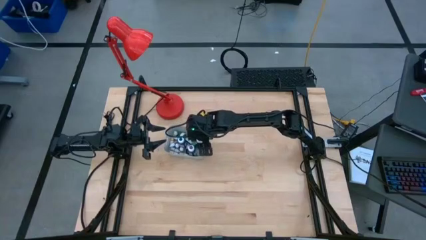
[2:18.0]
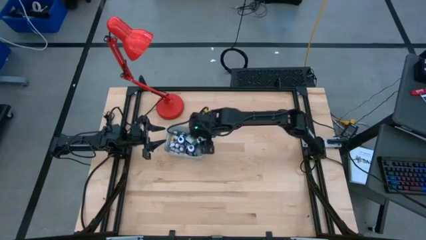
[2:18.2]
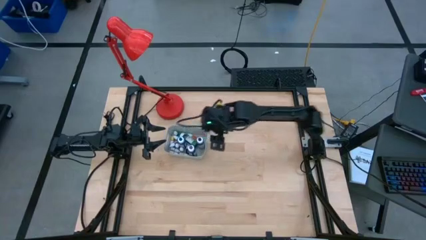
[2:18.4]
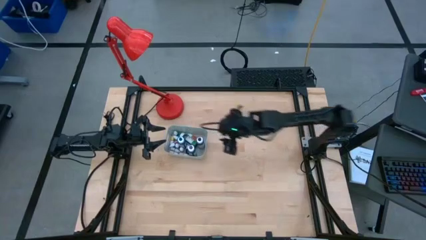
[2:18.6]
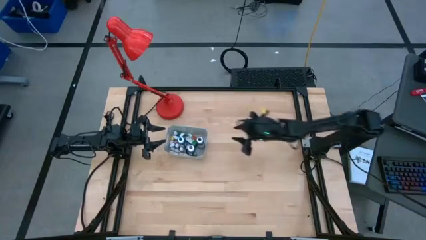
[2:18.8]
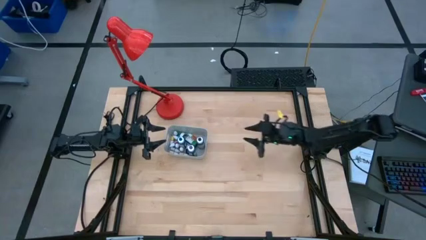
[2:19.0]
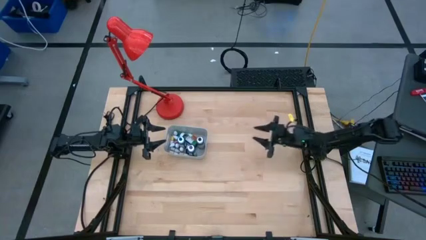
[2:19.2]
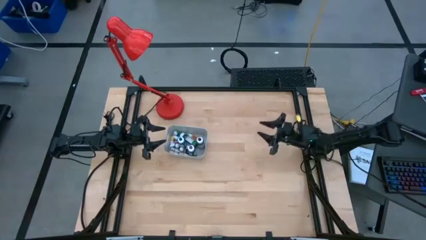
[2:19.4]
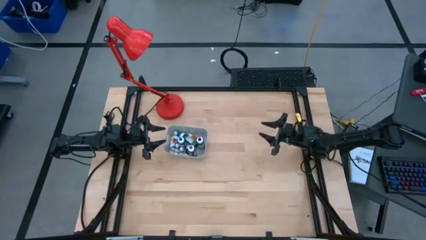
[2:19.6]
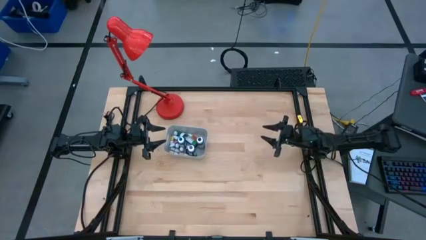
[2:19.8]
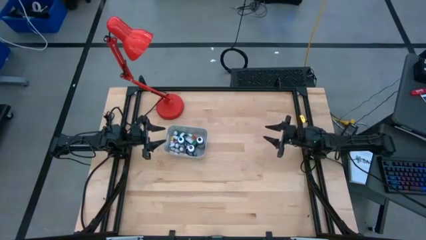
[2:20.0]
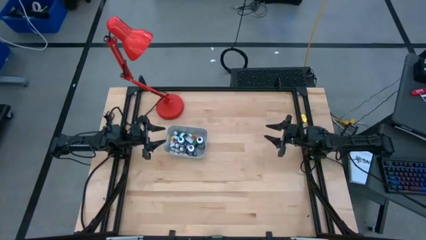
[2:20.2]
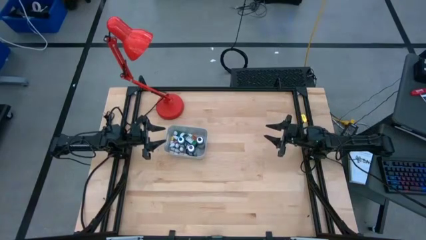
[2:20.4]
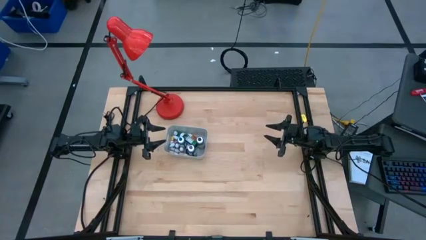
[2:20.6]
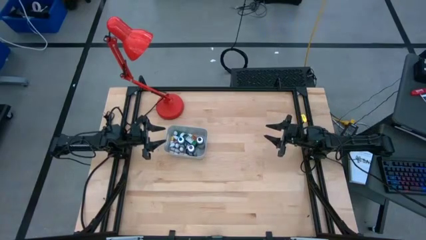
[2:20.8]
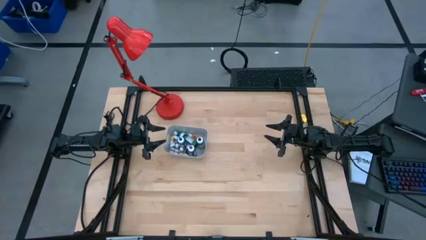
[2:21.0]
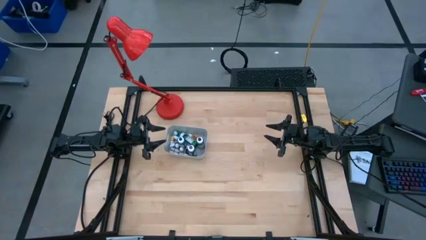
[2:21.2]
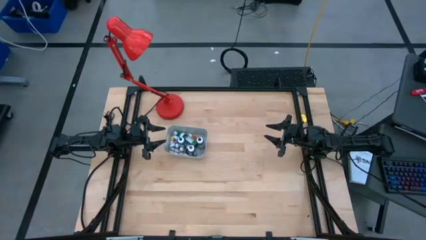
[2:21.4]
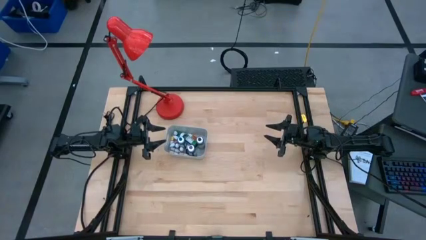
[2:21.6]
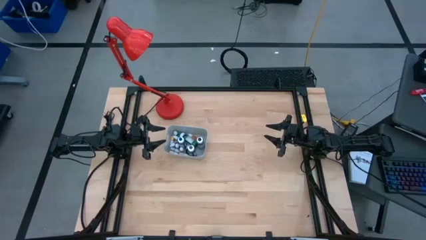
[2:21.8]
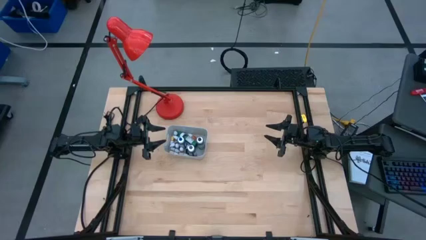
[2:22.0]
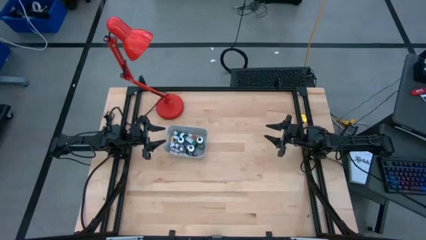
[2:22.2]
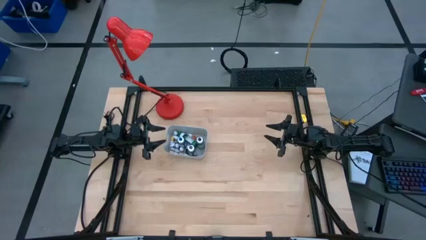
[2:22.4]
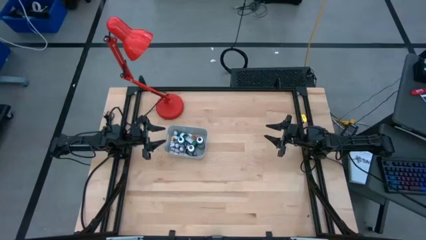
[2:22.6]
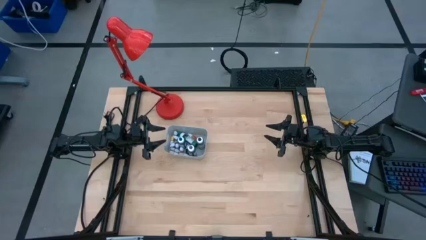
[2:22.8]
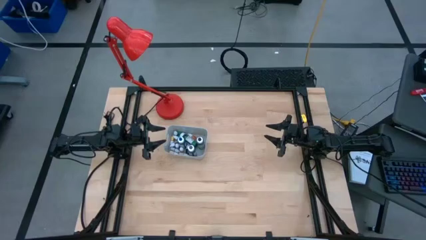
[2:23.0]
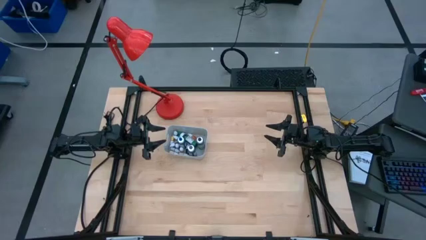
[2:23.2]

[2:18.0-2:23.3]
Task: Pick & Place food coloring
Return to Home Position
